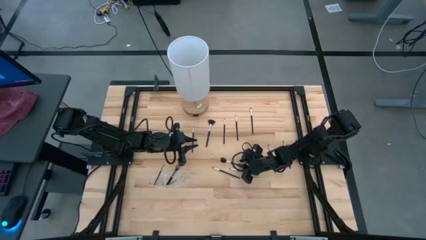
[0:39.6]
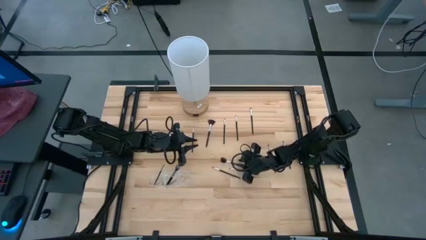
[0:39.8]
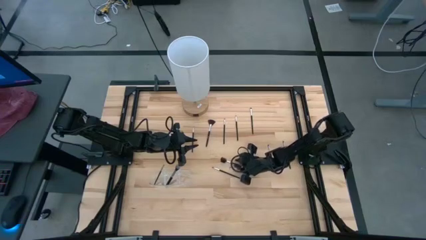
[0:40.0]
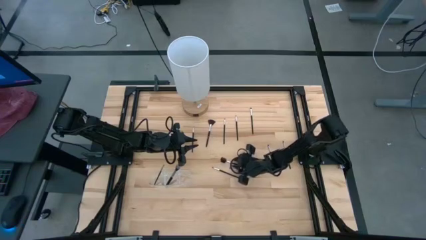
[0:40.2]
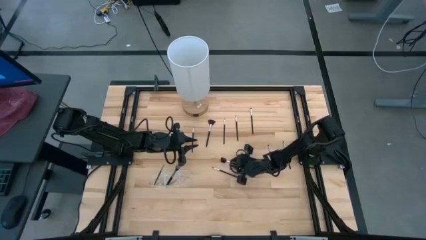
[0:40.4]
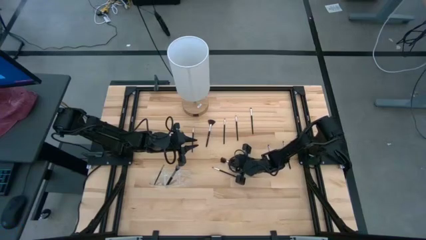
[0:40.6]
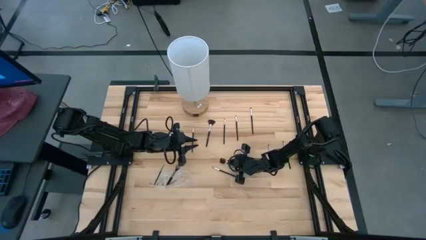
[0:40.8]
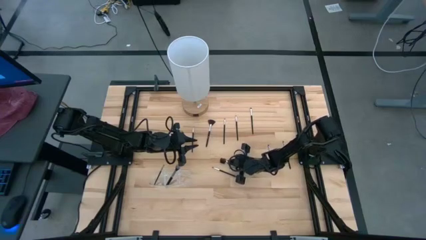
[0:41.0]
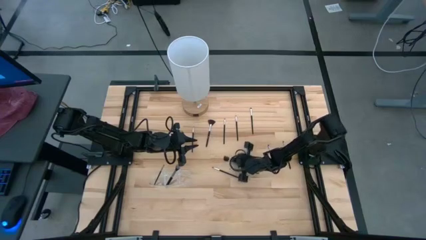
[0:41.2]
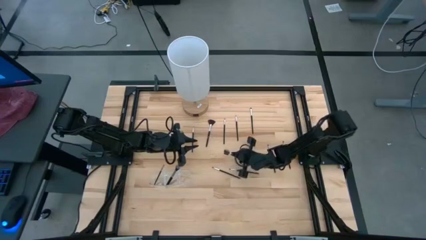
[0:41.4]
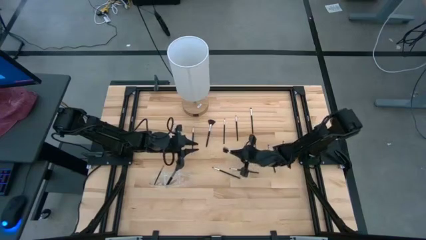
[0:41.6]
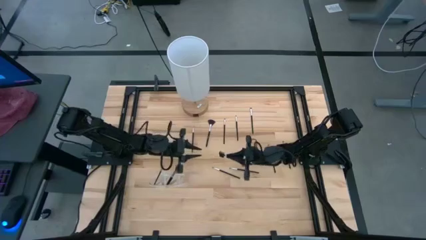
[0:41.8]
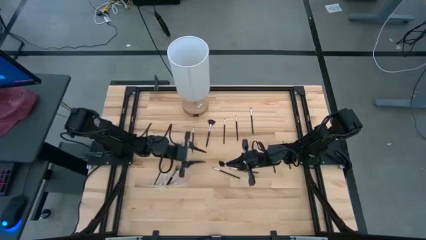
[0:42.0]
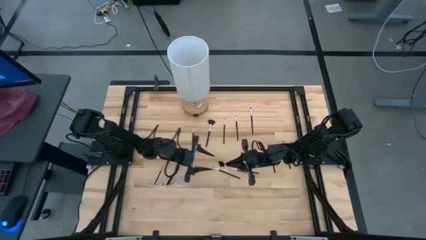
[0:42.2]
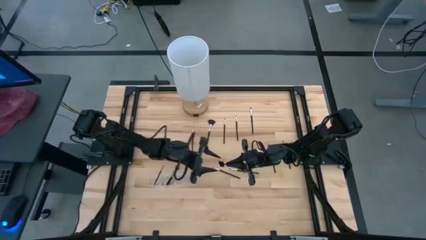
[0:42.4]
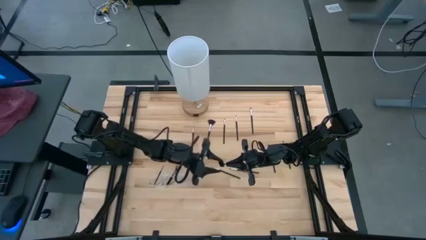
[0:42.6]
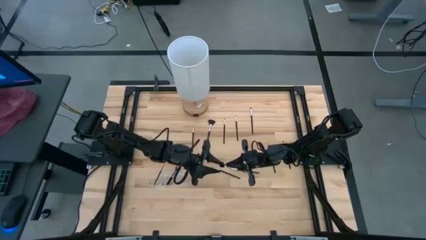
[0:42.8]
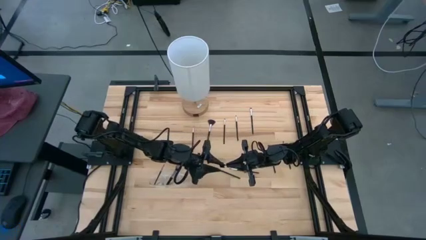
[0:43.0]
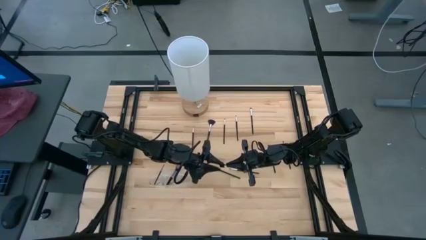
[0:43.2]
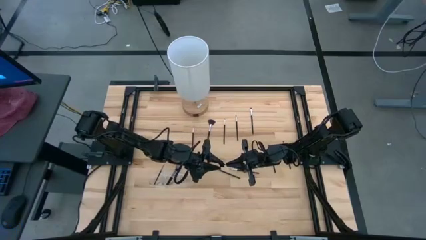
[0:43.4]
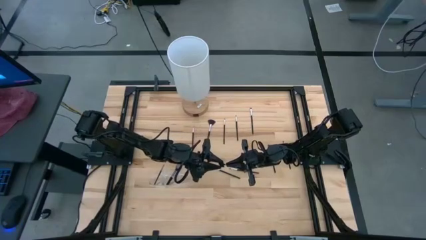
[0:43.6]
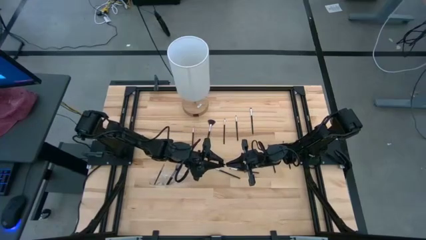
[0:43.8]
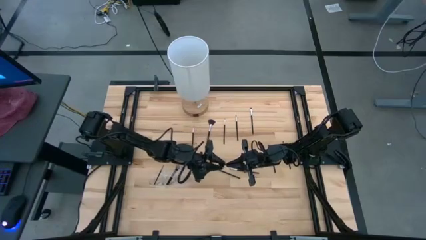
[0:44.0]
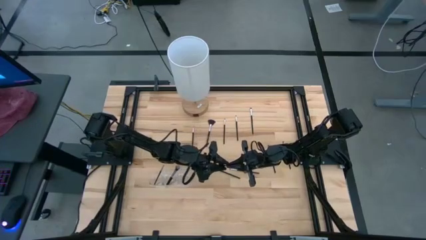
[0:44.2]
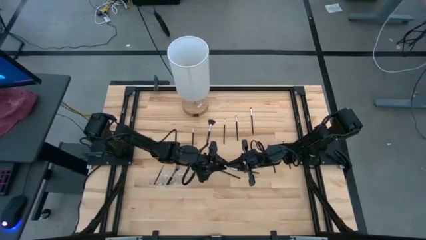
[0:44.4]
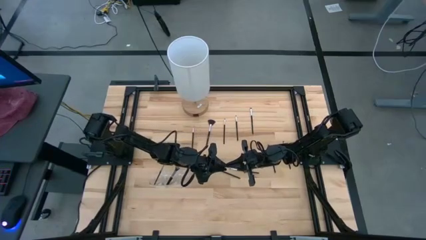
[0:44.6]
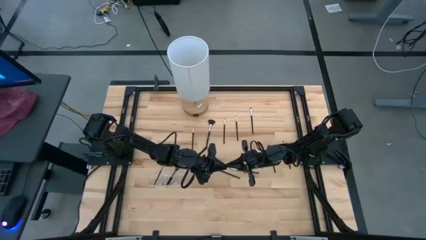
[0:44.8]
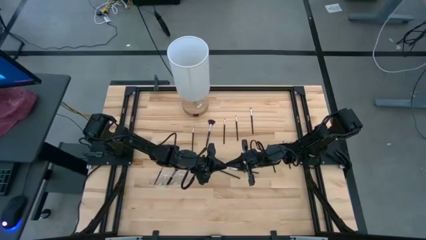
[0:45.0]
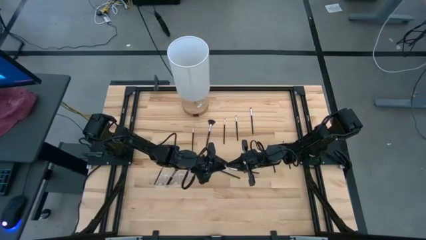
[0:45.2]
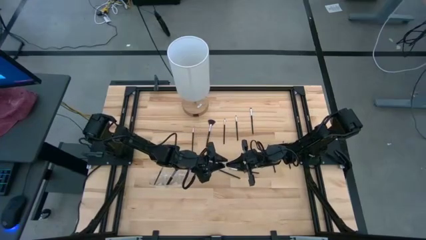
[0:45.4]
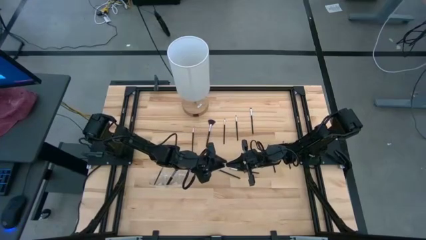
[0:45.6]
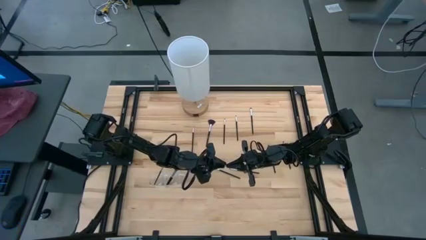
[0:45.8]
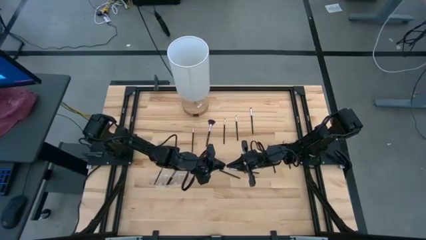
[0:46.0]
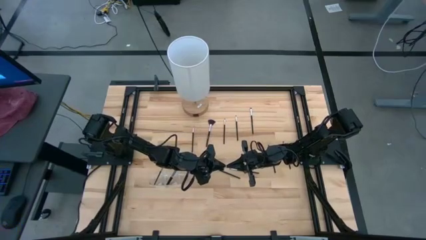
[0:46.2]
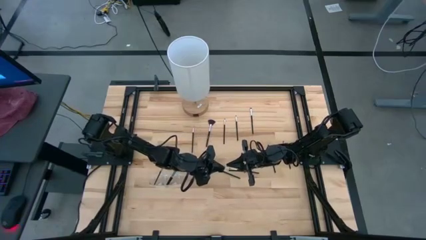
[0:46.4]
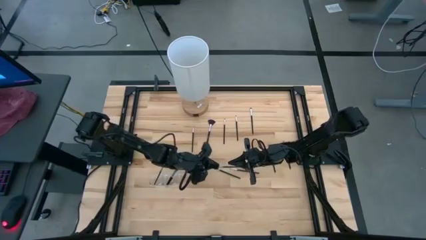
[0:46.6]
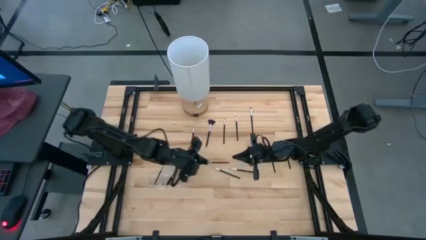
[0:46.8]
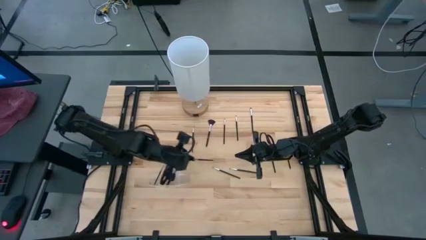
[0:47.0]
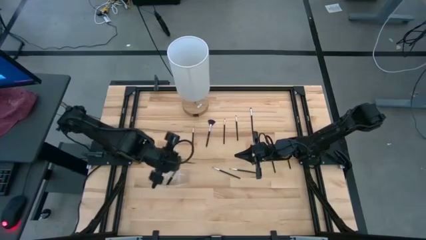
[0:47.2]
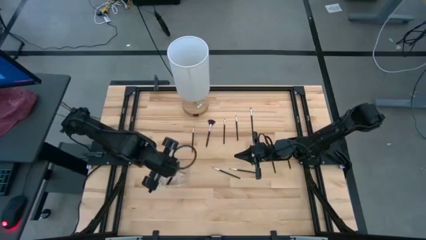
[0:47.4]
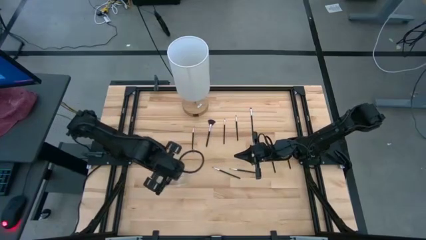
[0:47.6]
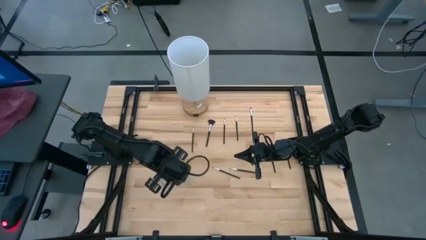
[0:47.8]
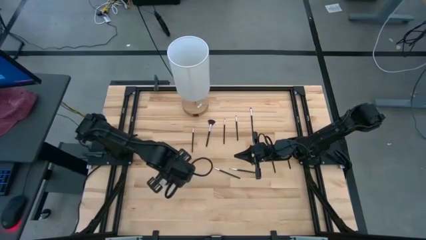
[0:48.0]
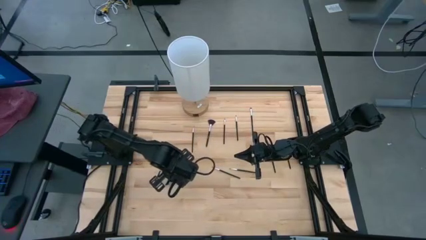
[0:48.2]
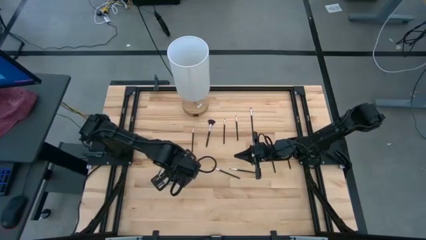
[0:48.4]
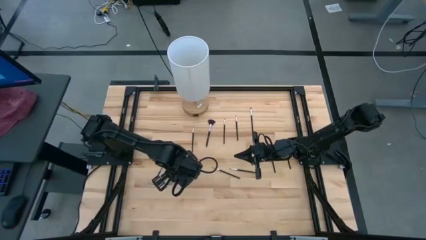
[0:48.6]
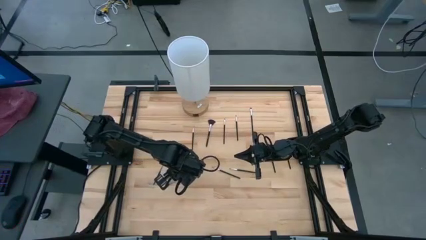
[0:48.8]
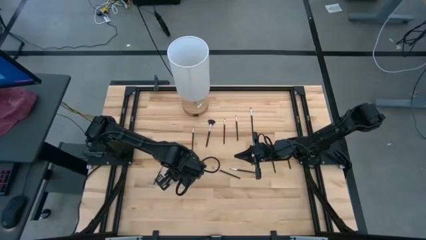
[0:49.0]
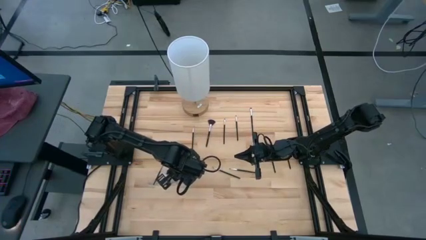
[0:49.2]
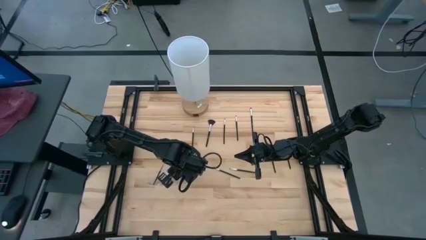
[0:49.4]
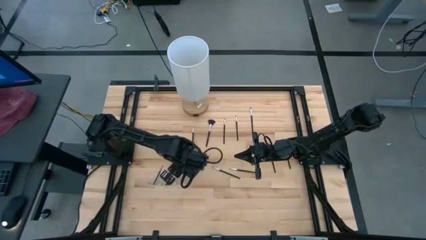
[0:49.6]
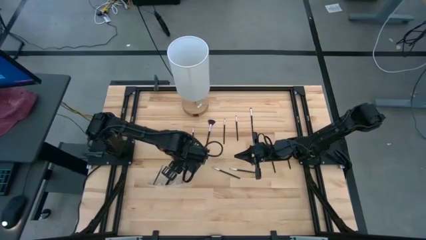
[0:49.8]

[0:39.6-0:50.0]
Task: Put items in baskets/containers
Put the brow brush in the transparent organizer

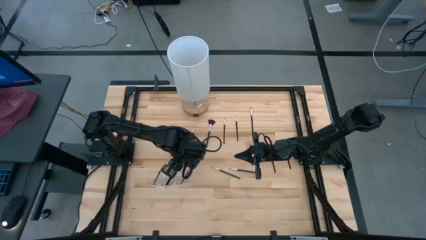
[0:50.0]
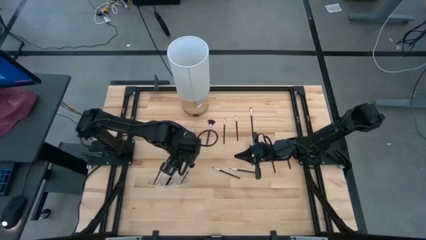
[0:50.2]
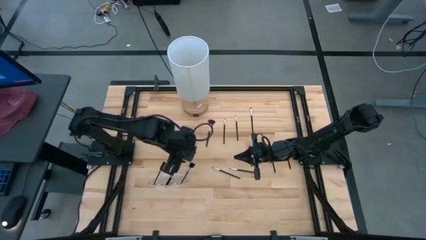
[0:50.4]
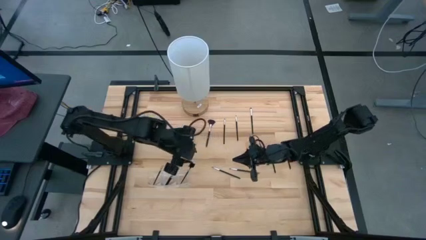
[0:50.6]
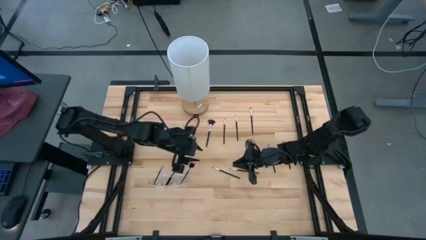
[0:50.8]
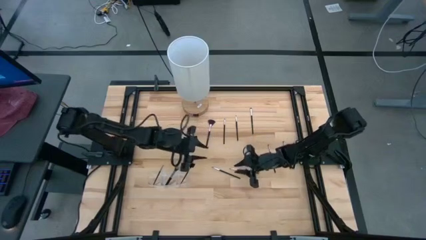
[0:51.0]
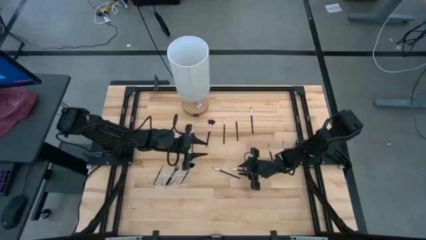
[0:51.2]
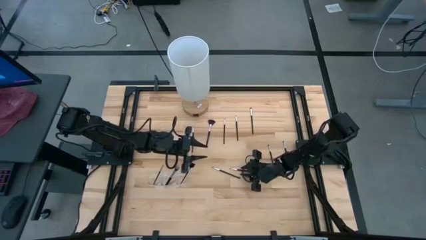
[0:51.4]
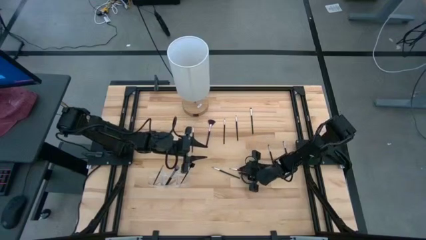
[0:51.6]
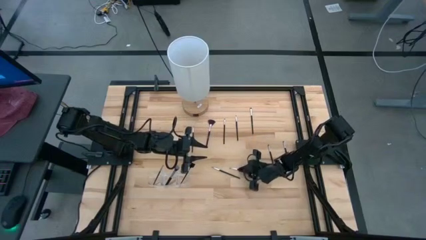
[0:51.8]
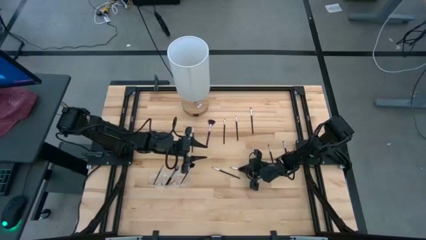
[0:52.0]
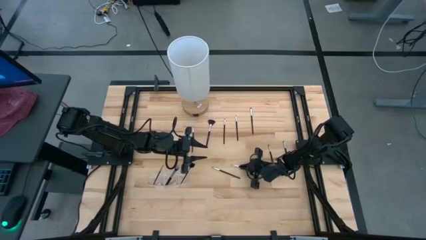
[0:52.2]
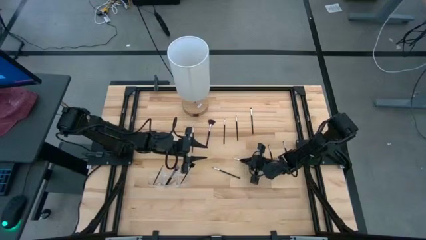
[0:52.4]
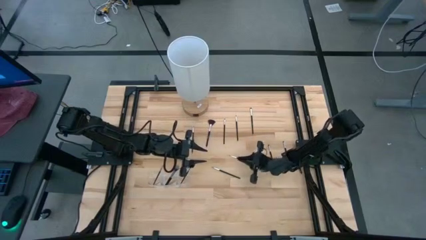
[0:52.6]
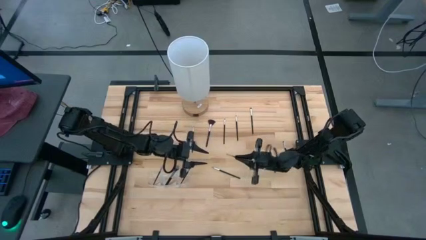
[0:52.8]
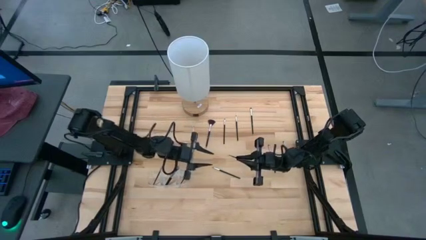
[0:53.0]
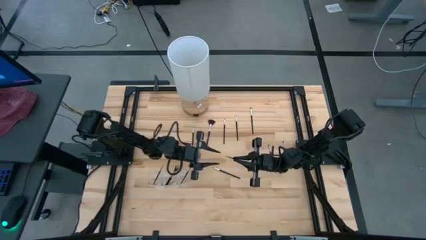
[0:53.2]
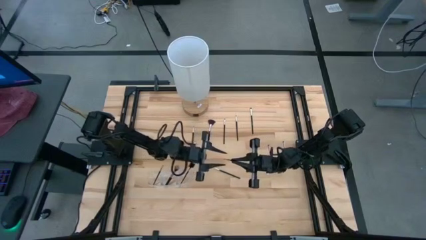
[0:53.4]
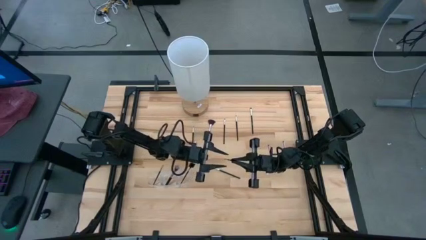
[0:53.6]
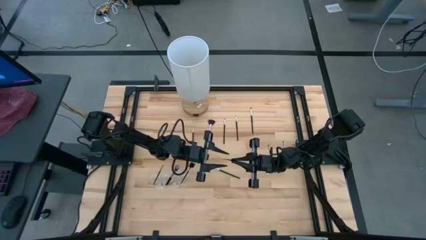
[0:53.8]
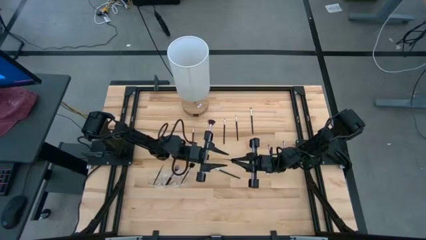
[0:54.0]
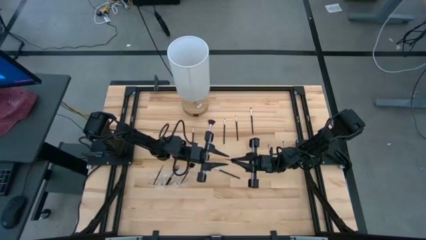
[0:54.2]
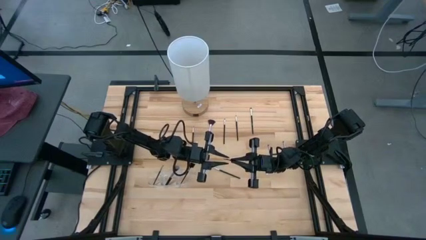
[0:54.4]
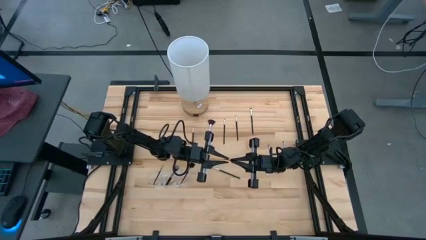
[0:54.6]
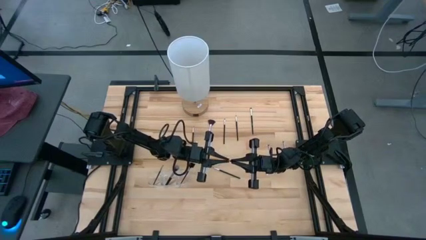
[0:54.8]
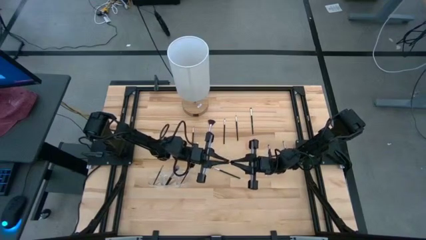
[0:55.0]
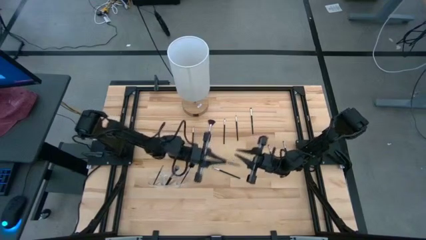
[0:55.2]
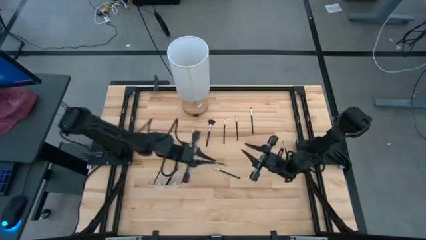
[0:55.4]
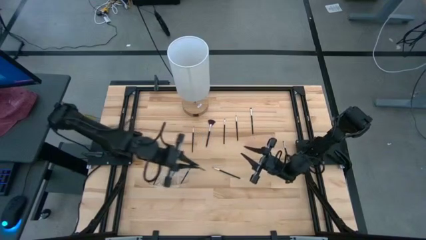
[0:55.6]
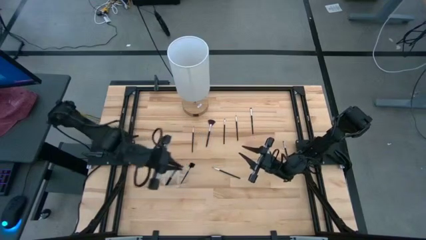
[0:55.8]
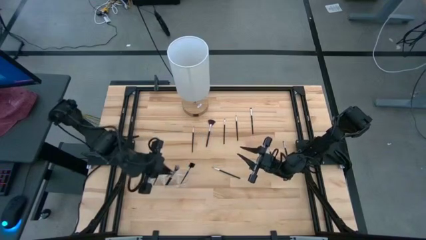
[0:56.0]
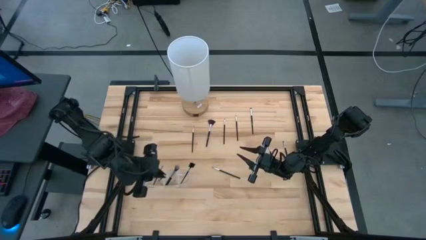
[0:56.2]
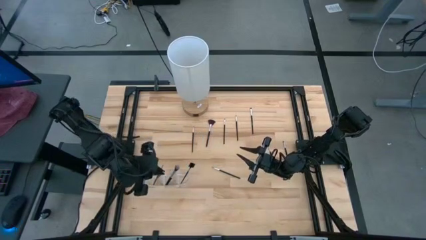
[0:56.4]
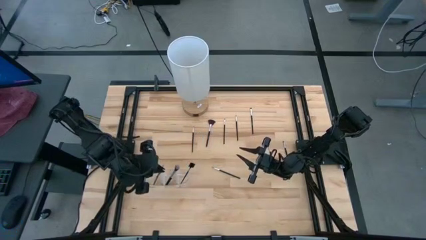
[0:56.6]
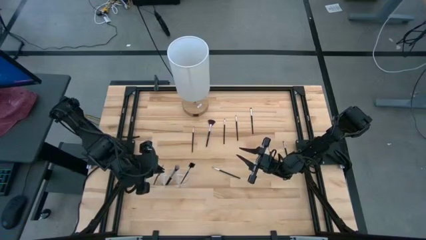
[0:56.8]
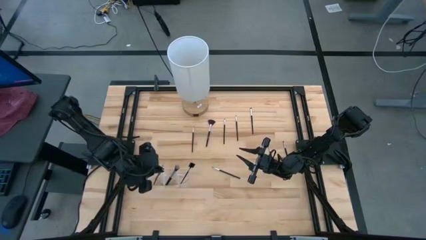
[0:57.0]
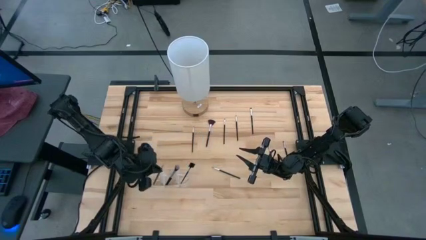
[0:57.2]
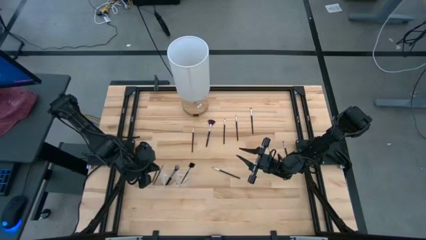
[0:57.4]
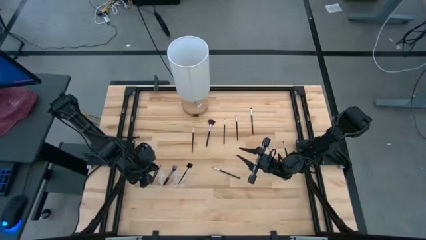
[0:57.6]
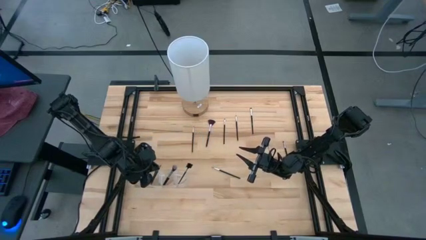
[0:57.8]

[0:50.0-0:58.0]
Put the eyeshadow brush in the transparent organizer
